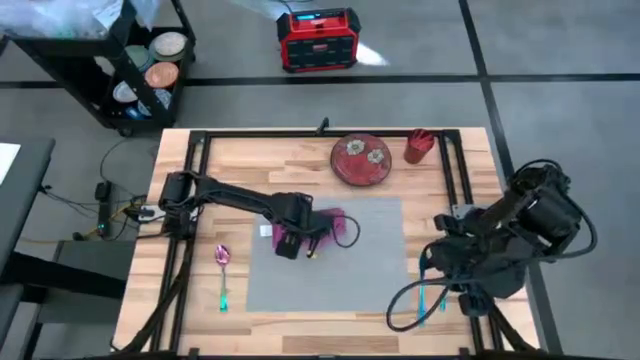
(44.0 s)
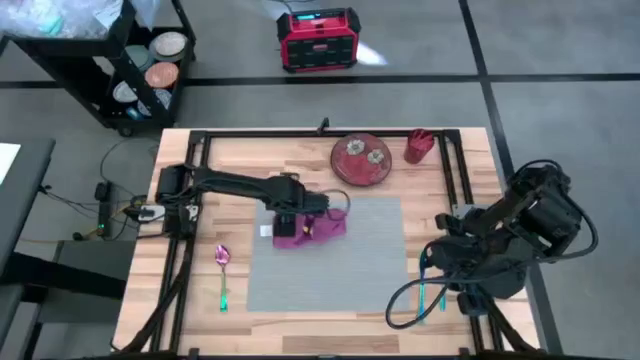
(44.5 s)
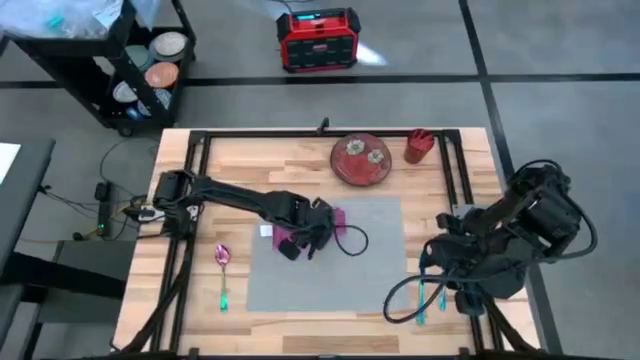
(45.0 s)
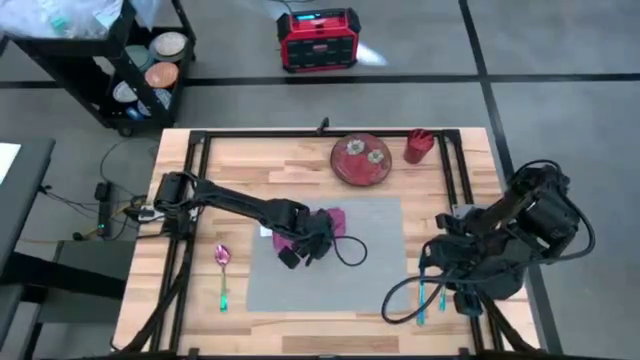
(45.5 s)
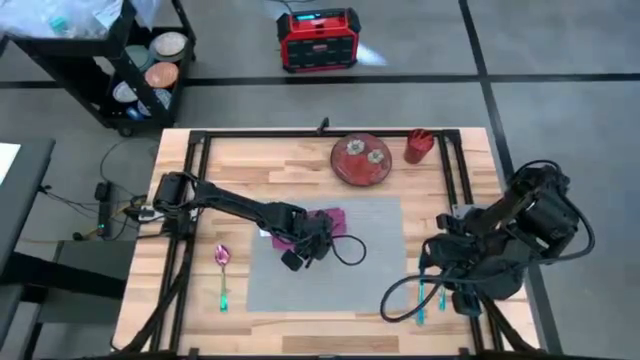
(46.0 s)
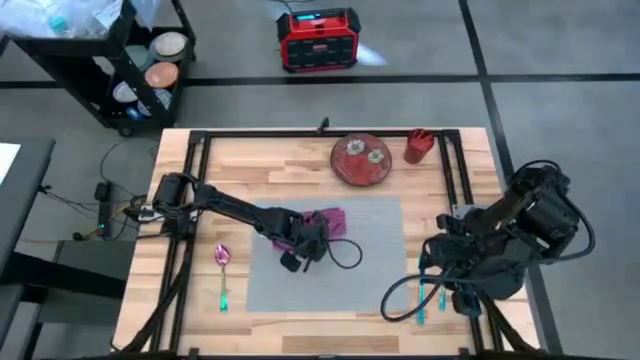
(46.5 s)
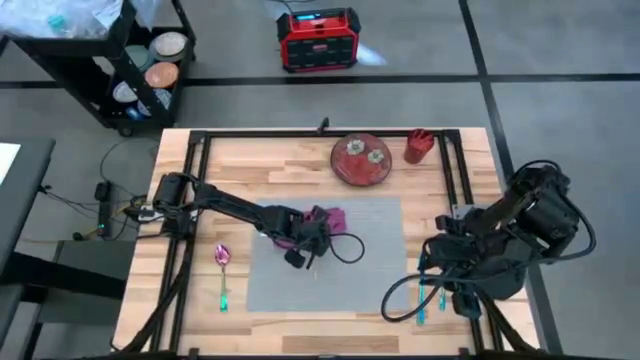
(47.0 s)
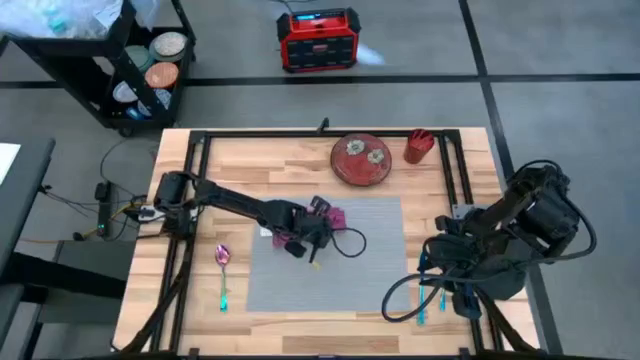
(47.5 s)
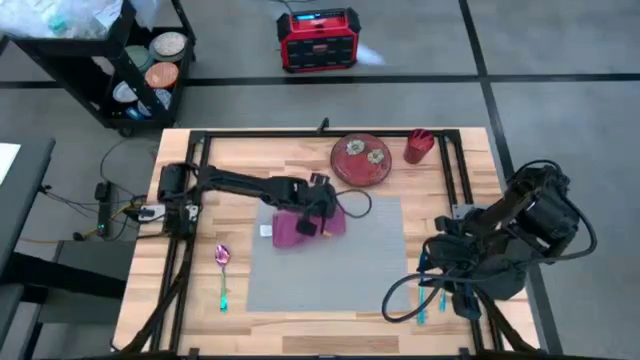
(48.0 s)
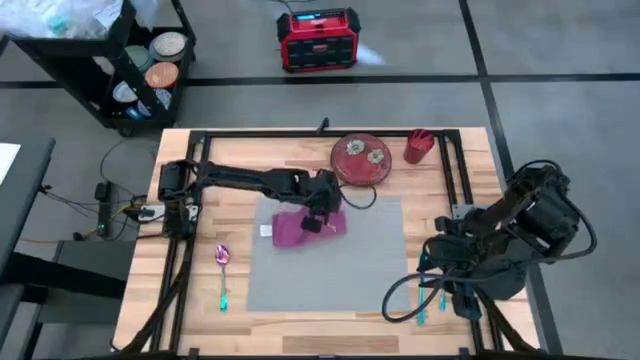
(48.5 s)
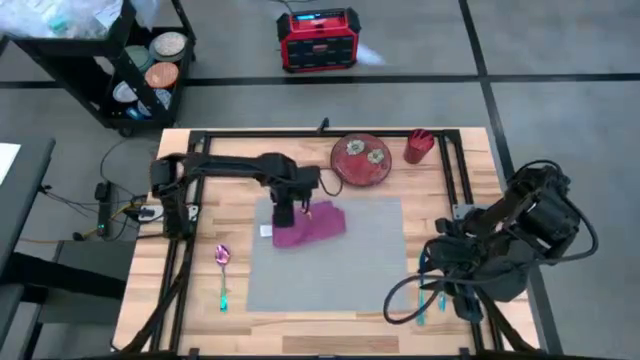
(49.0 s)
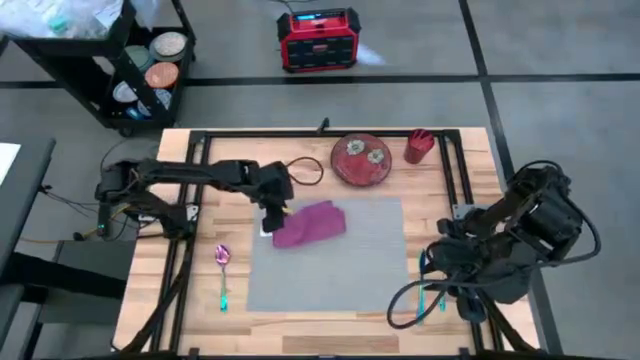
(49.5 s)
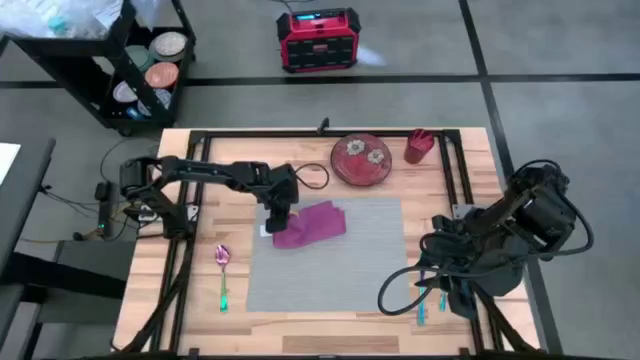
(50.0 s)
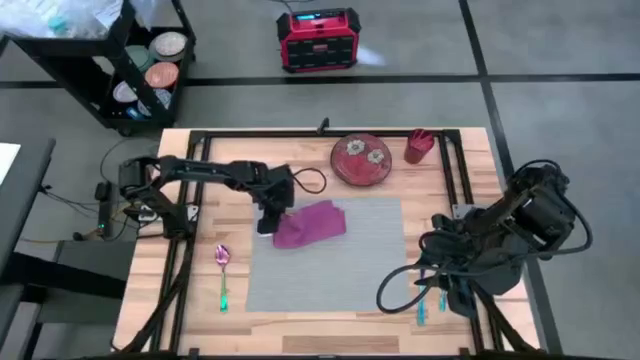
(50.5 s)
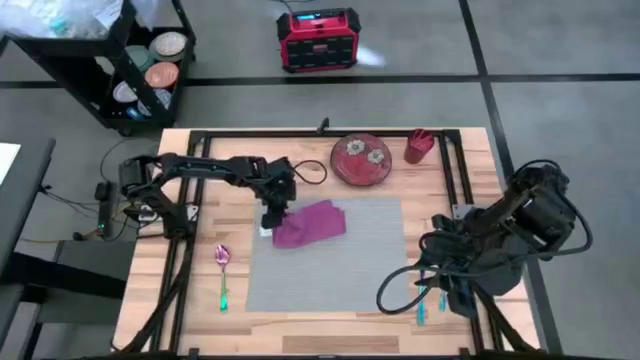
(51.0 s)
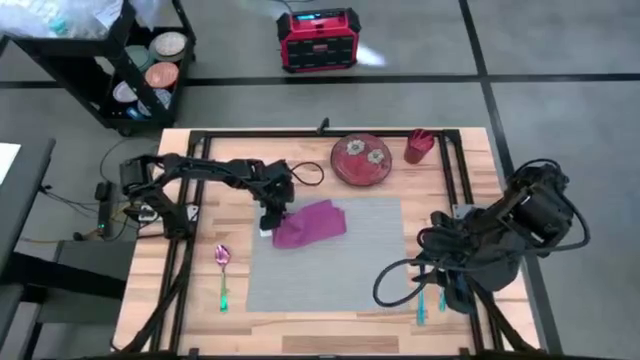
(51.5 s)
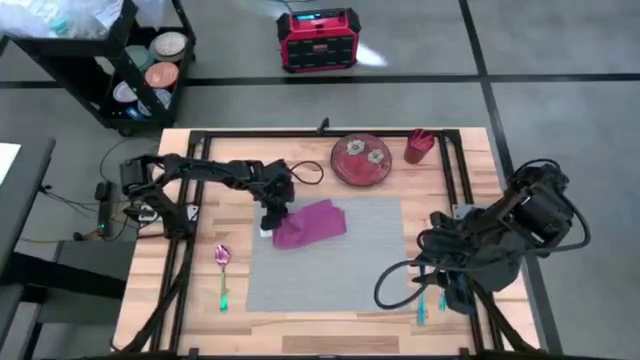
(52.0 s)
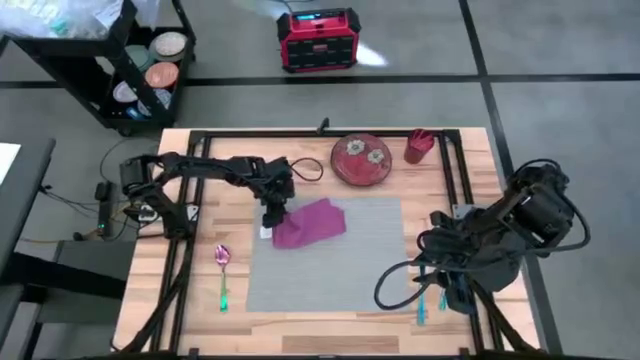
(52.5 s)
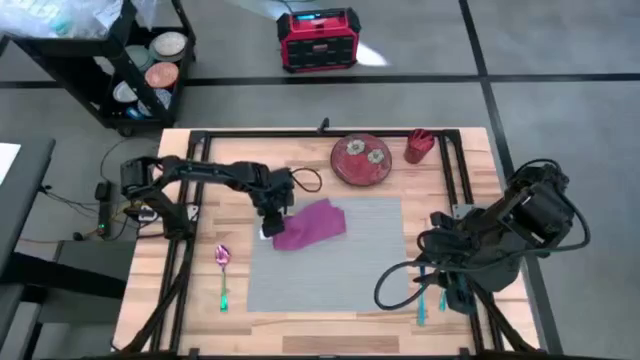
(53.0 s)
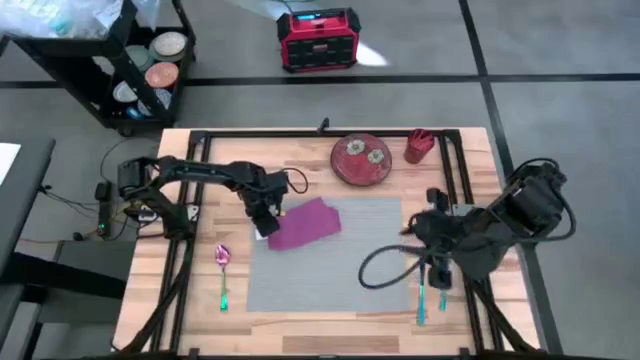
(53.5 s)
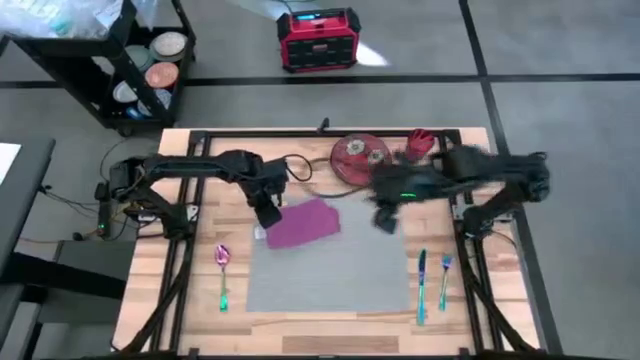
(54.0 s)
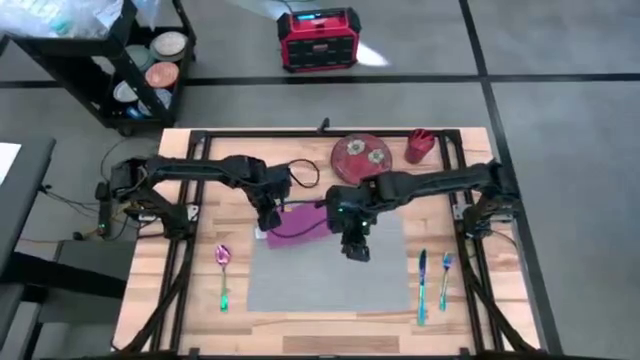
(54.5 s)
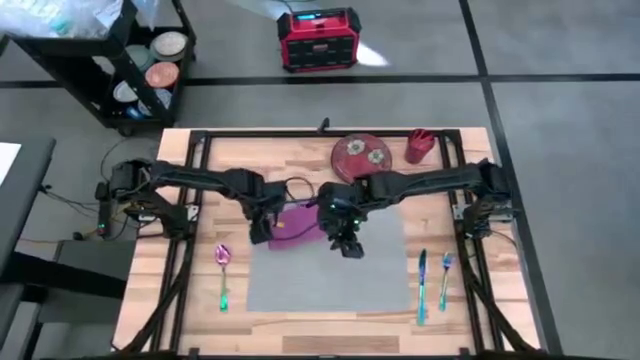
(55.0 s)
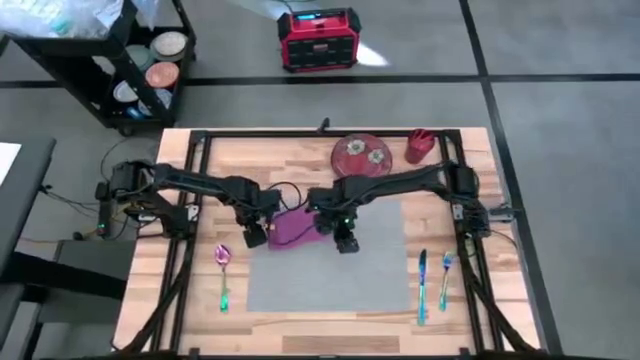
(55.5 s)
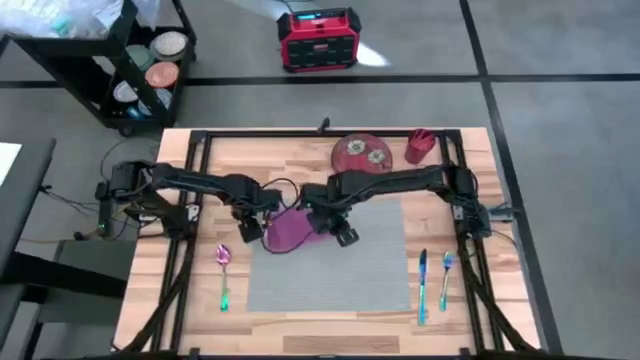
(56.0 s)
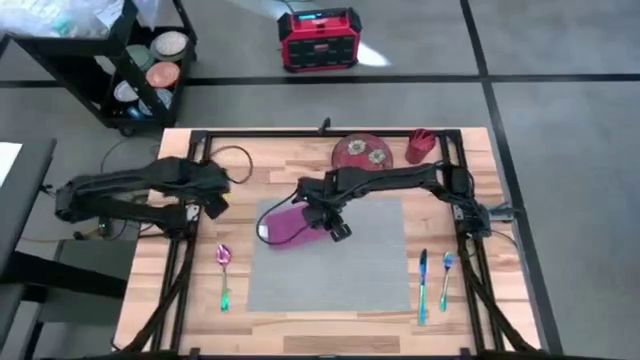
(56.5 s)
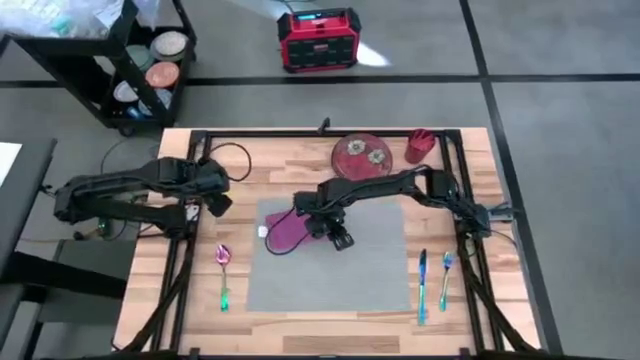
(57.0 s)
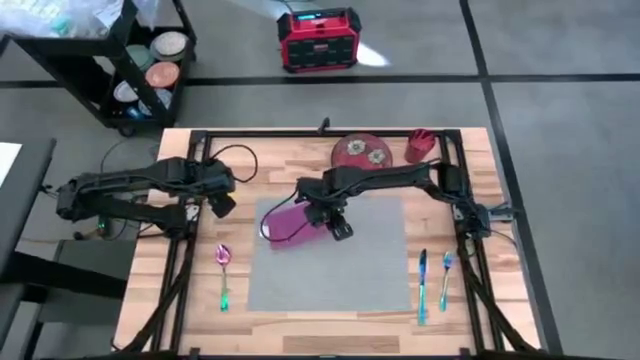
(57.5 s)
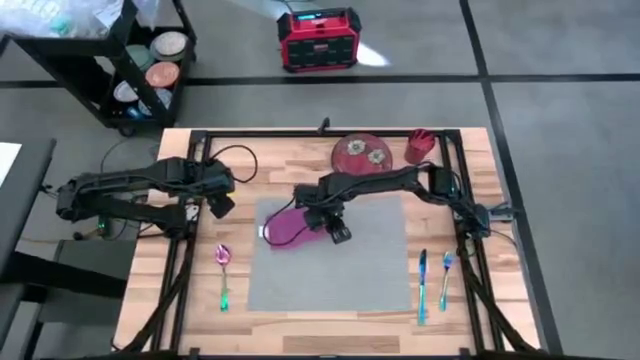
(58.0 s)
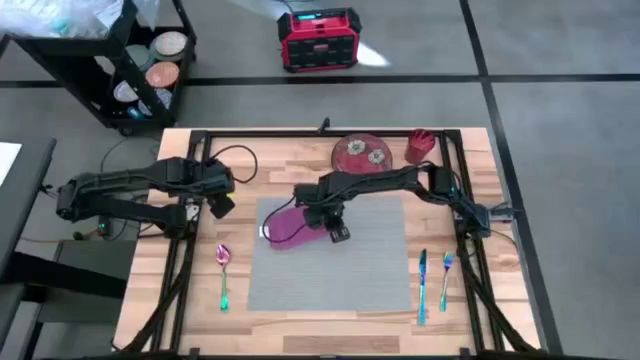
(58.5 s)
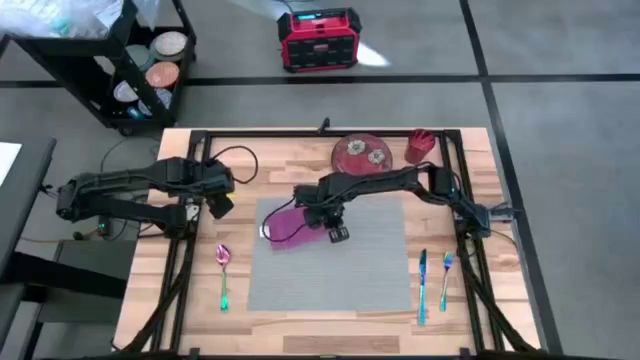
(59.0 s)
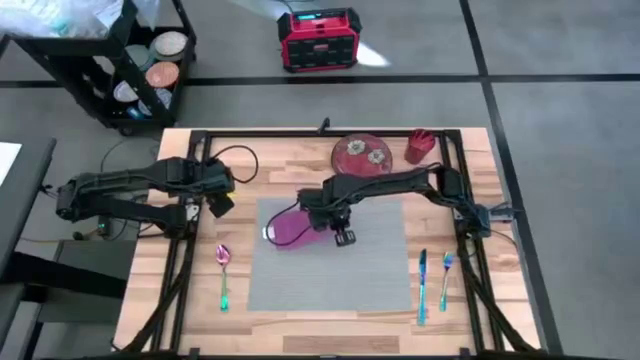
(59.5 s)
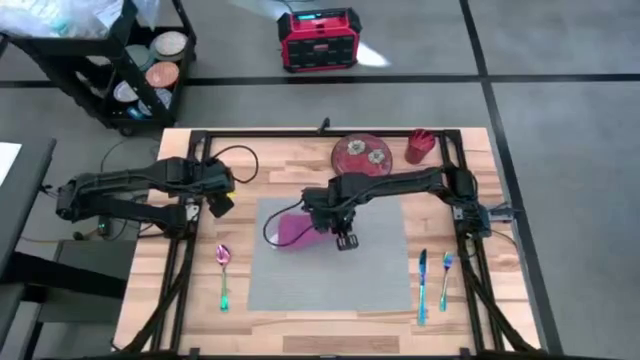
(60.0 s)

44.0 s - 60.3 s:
Task: Set table place
Fold the violet table napkin on the gray table mat

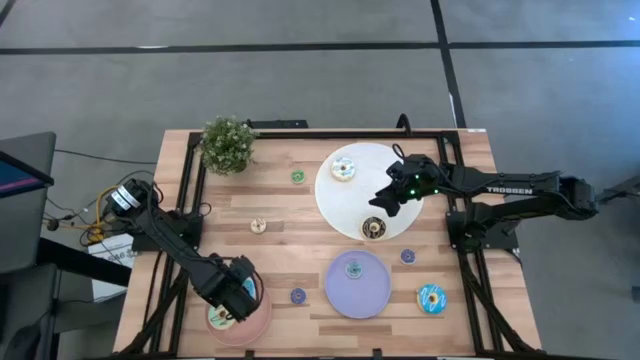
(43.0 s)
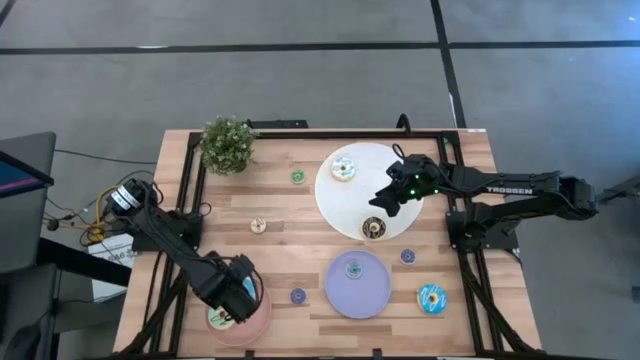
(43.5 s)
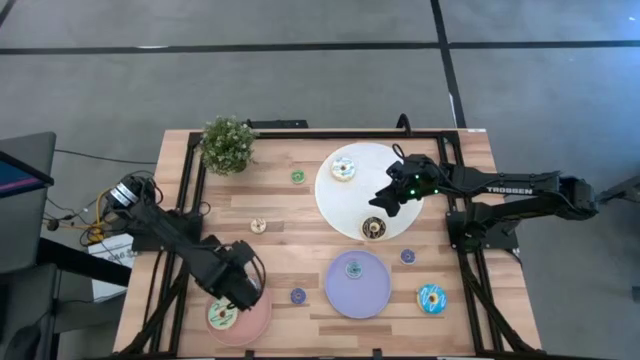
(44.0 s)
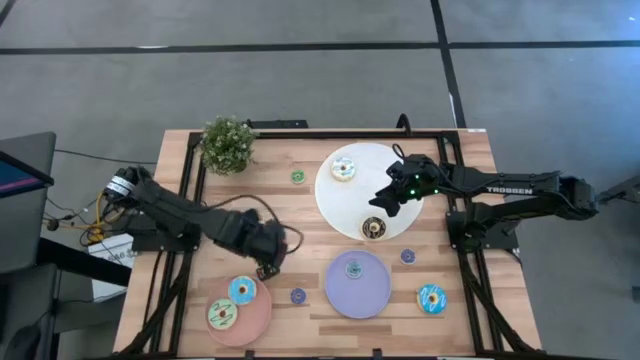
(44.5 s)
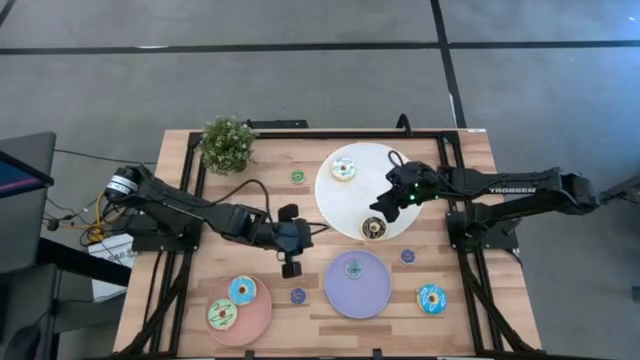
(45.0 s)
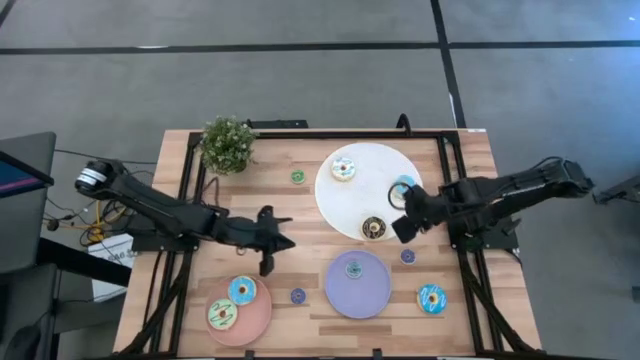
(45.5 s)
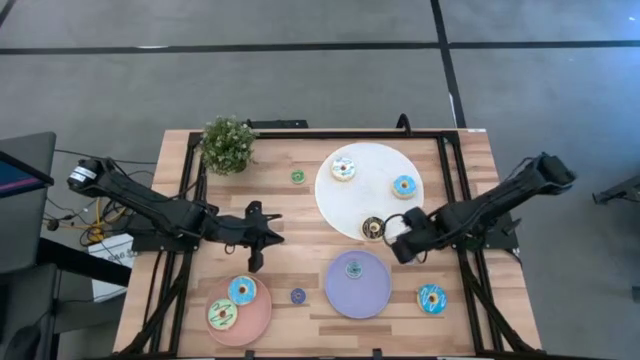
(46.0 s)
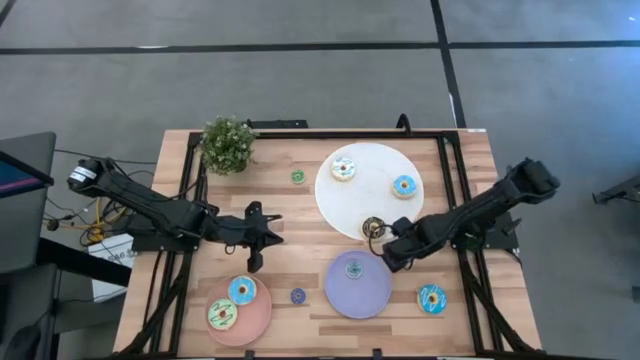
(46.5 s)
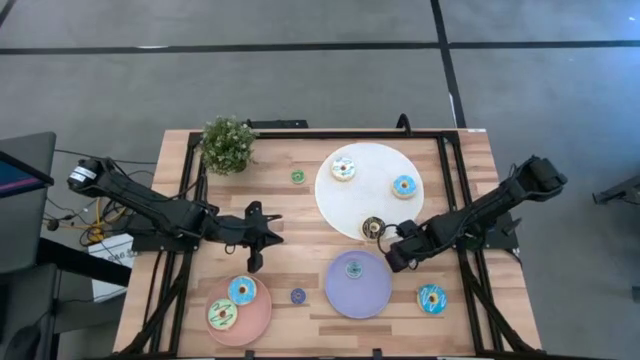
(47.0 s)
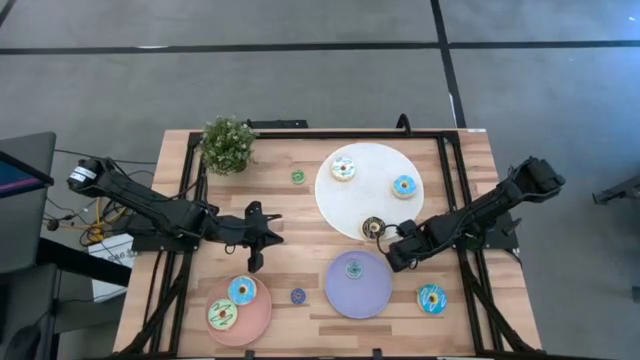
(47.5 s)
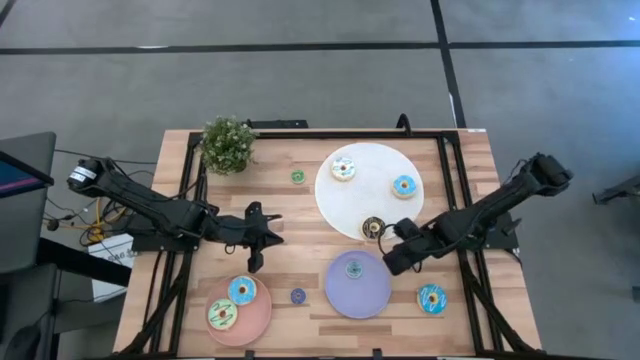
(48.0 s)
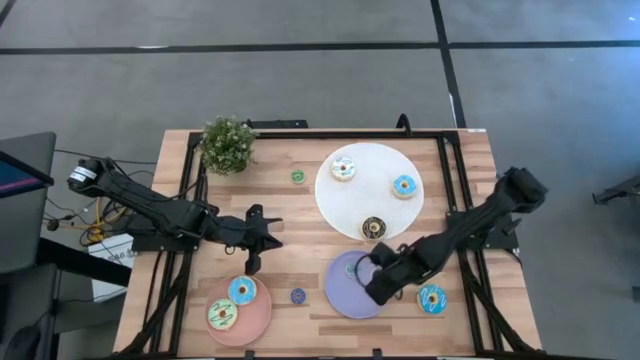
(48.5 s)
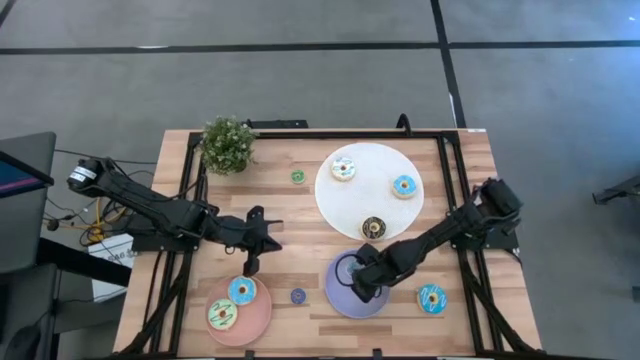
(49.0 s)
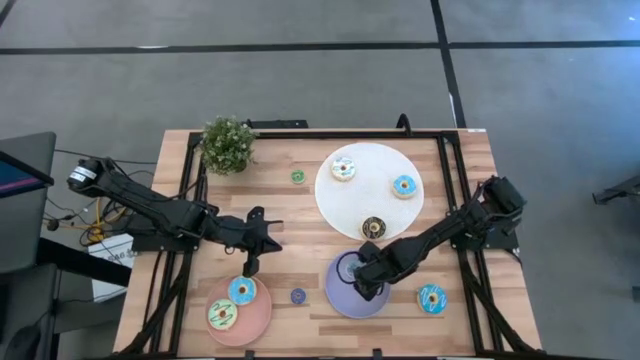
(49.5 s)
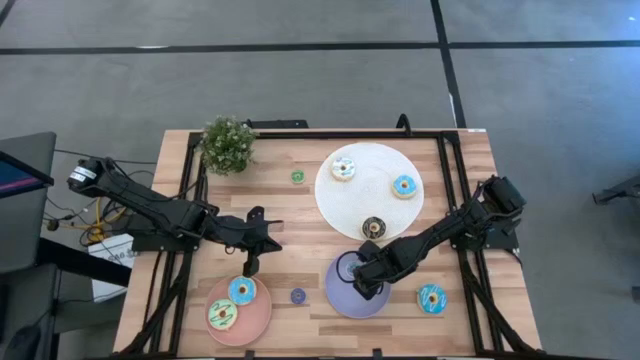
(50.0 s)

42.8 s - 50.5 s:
Task: Pick & Place donuts
Put the right small purple donut on the purple plate
